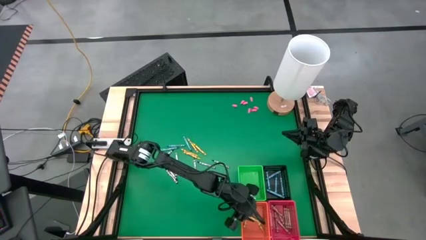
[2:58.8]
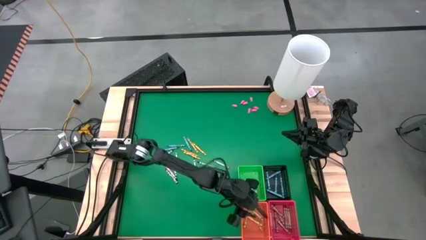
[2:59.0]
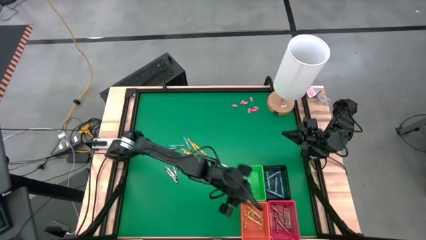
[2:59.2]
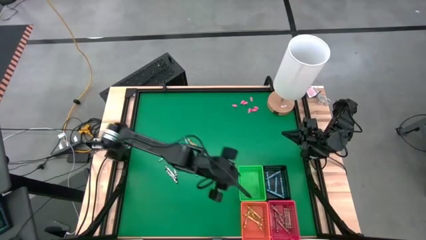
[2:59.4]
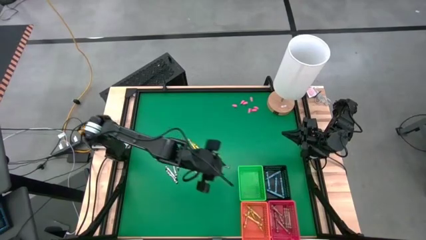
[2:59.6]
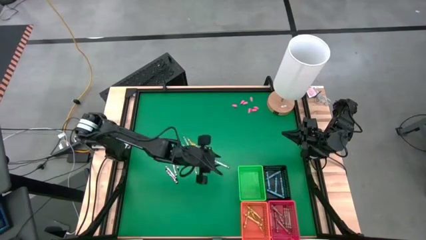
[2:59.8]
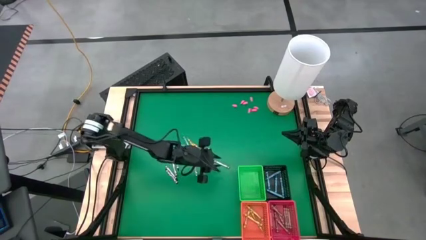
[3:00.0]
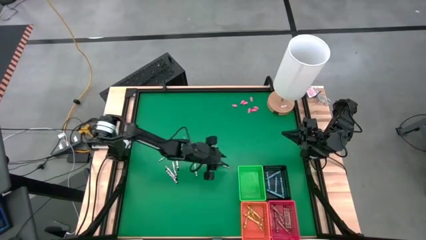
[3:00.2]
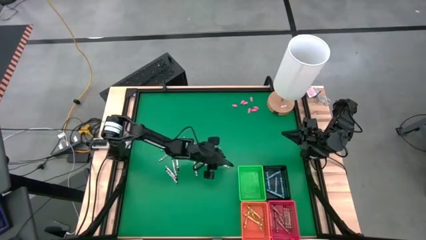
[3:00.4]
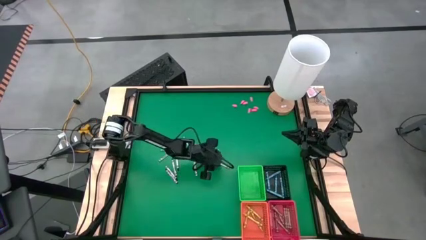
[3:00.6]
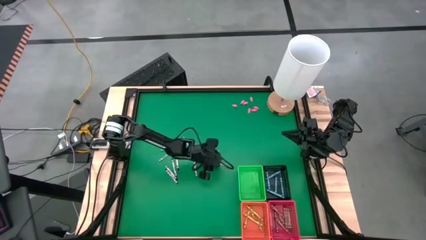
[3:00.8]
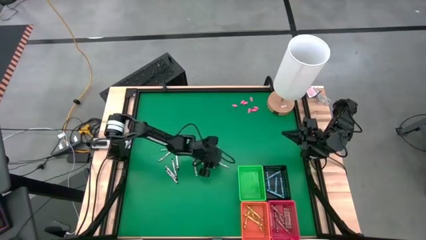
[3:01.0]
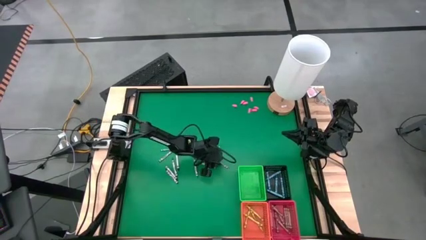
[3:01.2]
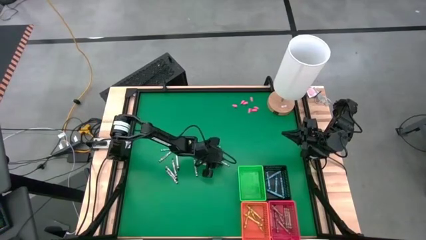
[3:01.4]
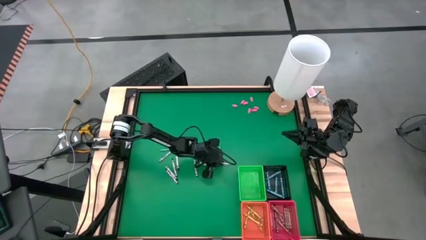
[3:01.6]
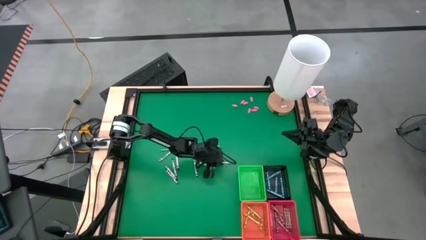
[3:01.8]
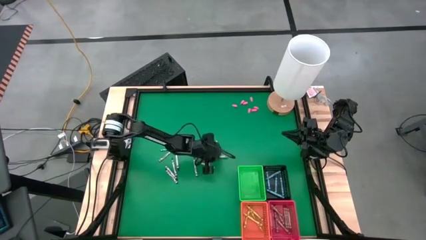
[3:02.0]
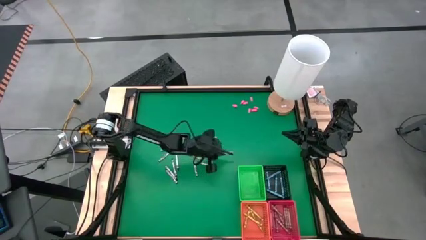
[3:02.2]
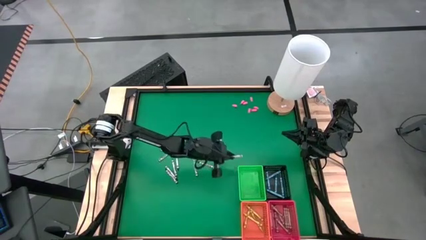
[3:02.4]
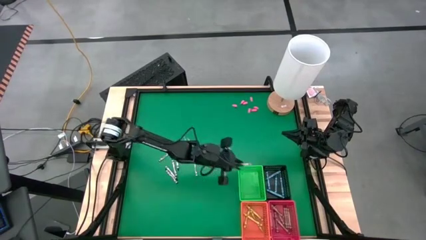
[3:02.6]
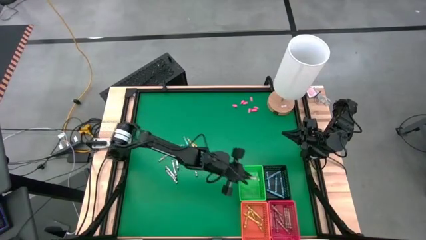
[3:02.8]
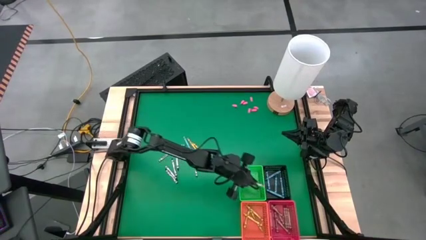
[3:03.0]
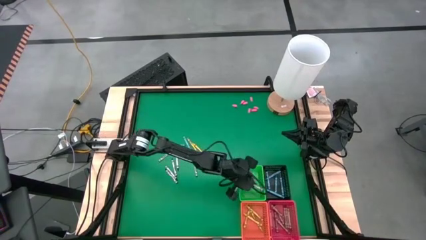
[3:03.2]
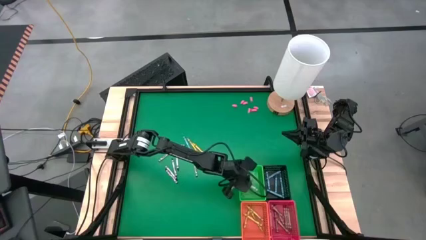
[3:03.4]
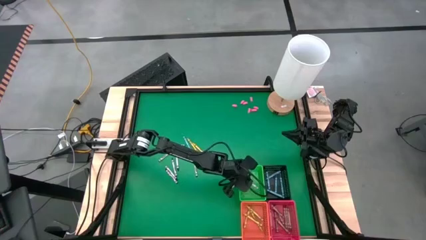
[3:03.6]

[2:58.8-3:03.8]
Task: Sort crayons
Put the black crayon into the green bin

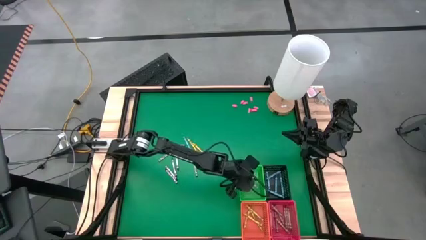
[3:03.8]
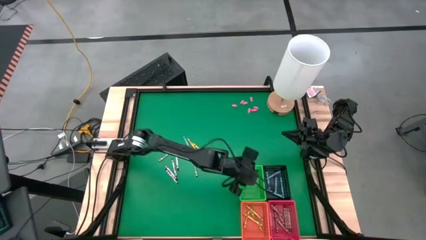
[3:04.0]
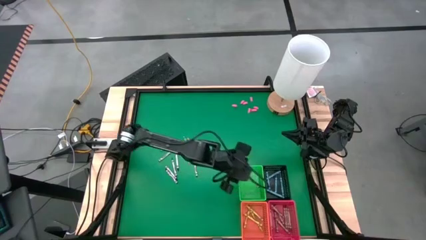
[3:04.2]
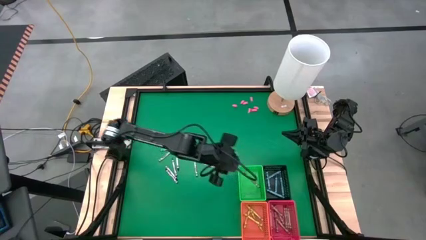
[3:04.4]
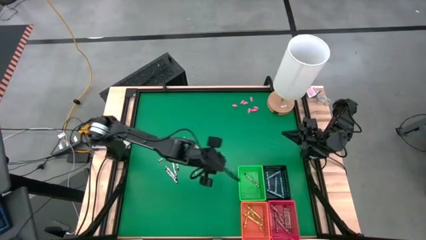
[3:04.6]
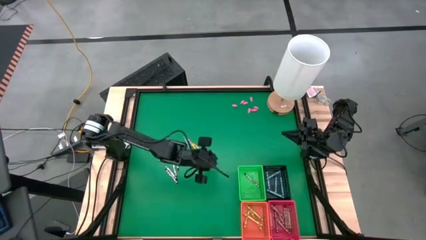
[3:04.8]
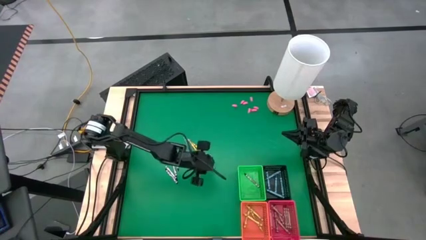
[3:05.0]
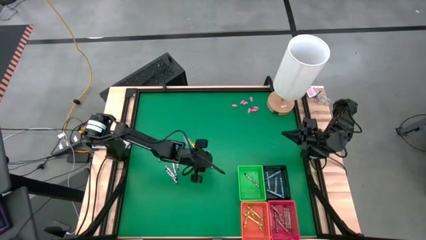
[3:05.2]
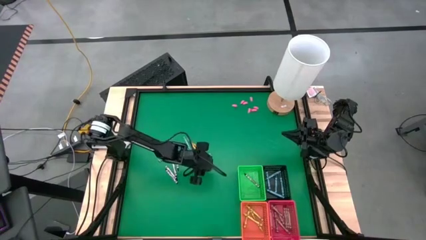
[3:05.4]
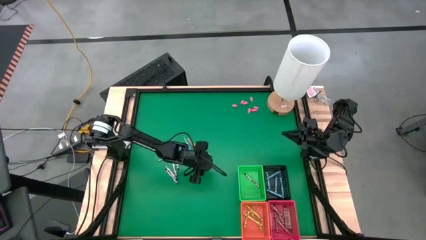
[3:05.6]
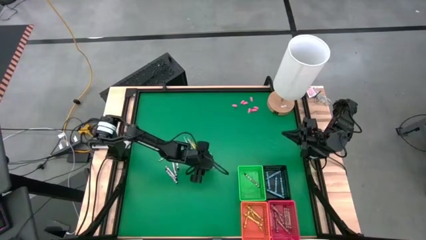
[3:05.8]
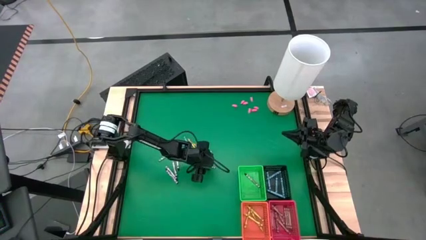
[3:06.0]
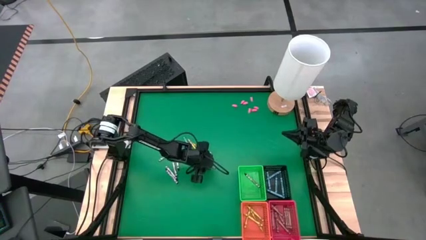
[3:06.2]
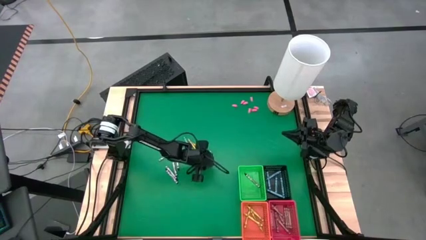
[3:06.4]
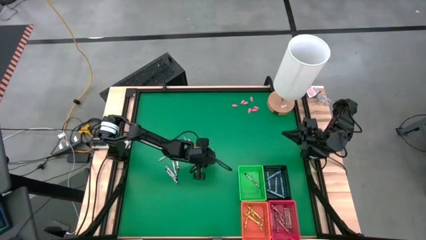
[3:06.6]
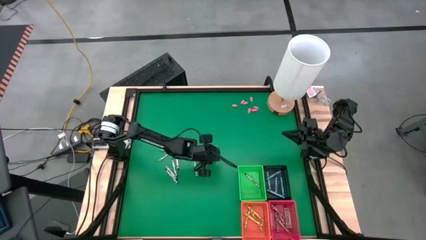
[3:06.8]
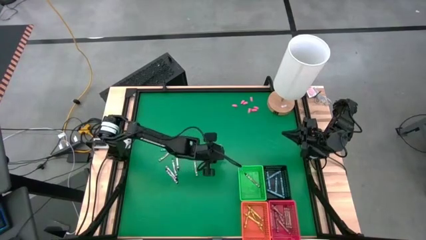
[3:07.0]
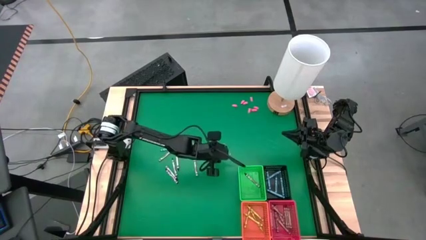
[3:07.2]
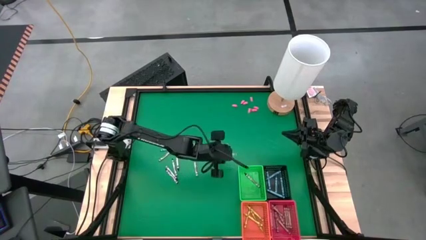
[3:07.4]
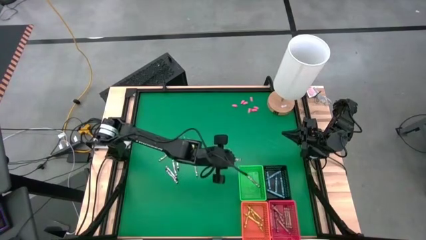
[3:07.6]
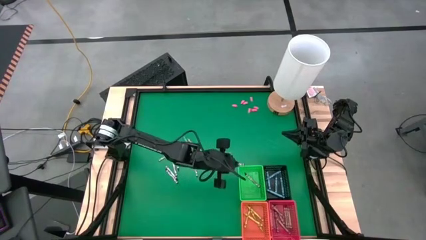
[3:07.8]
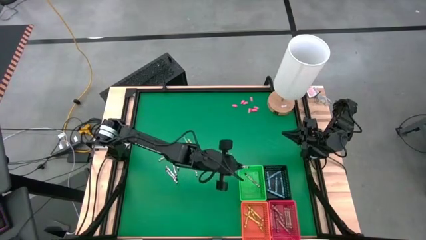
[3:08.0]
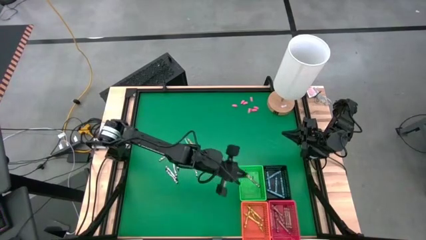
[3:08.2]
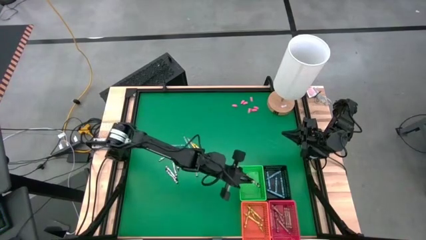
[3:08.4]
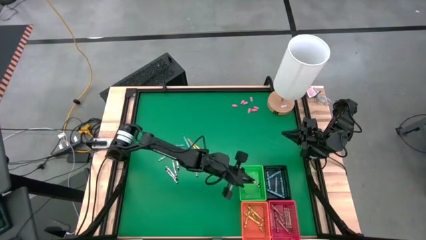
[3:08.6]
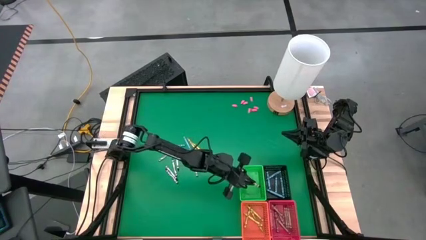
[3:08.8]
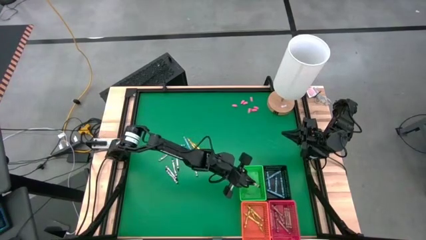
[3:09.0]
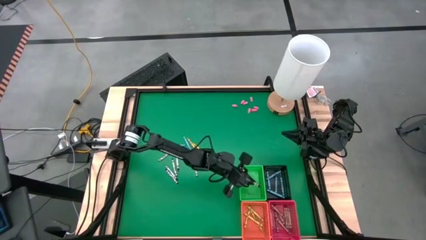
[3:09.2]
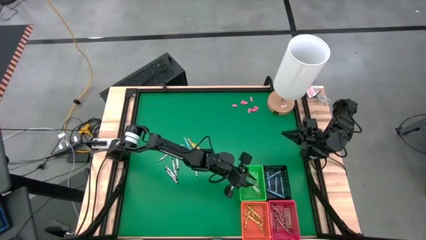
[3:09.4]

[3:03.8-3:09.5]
Put the black crayon into the green bin

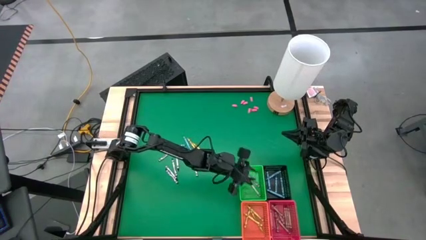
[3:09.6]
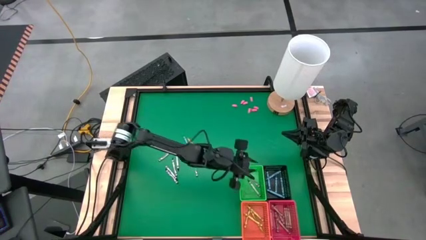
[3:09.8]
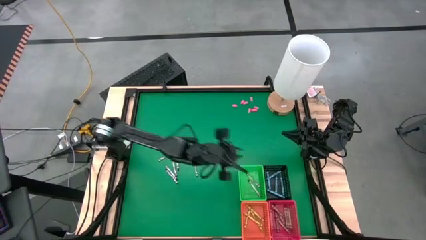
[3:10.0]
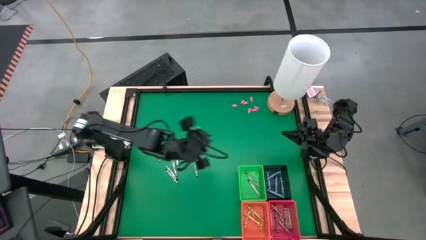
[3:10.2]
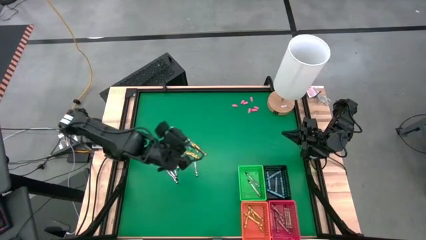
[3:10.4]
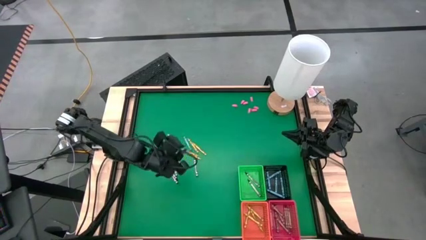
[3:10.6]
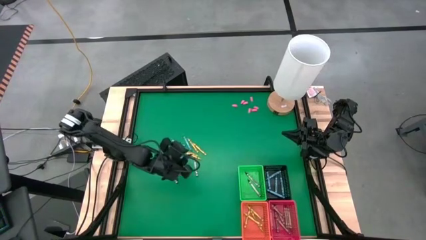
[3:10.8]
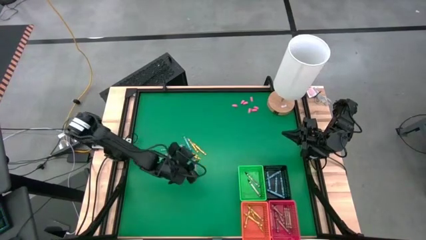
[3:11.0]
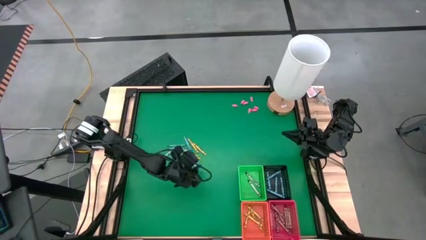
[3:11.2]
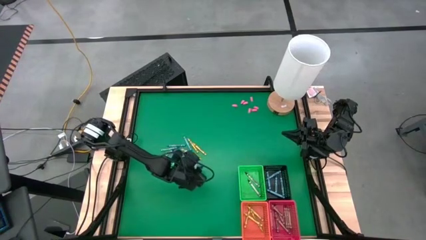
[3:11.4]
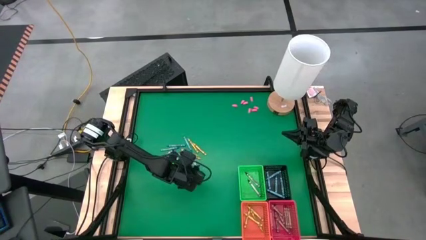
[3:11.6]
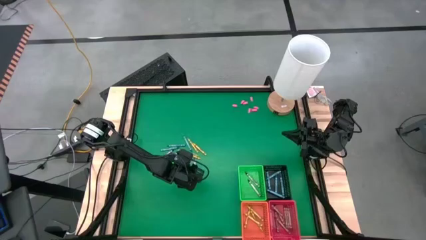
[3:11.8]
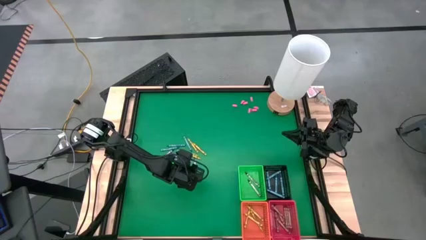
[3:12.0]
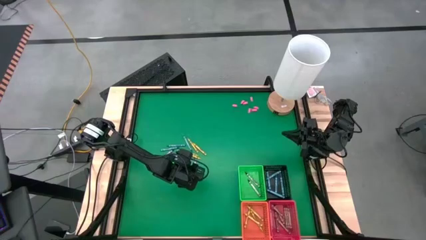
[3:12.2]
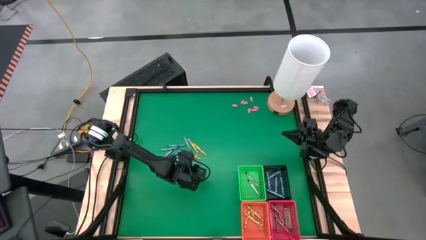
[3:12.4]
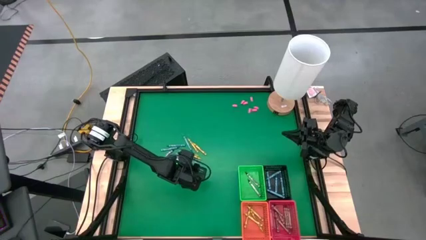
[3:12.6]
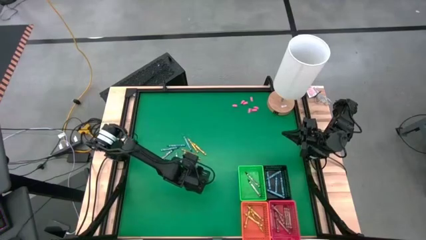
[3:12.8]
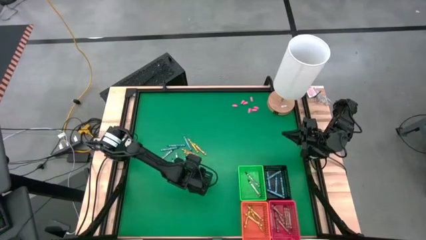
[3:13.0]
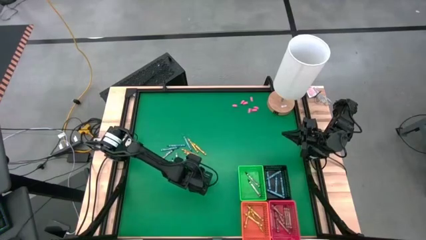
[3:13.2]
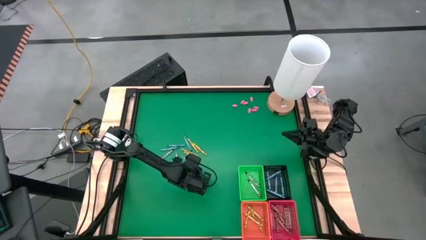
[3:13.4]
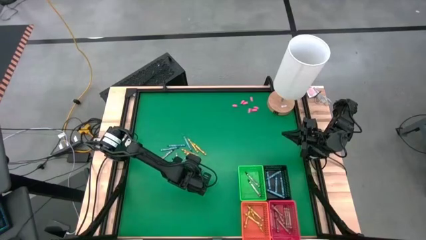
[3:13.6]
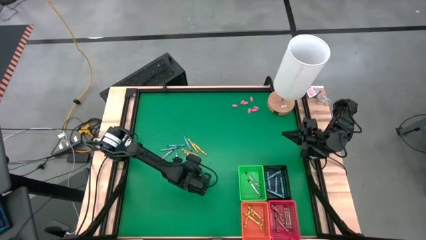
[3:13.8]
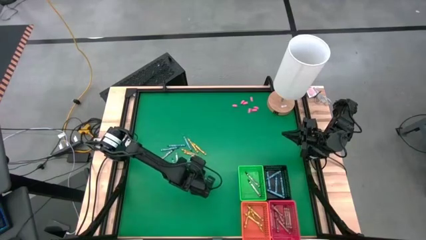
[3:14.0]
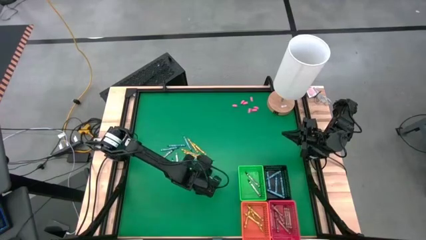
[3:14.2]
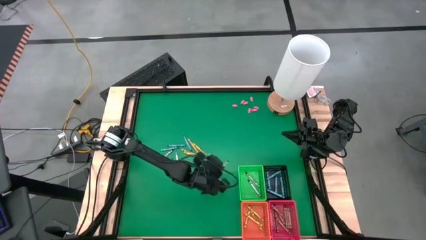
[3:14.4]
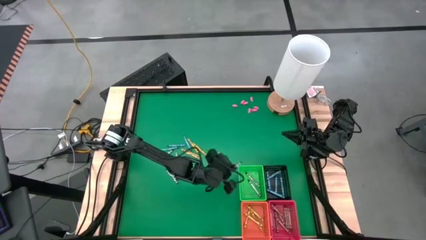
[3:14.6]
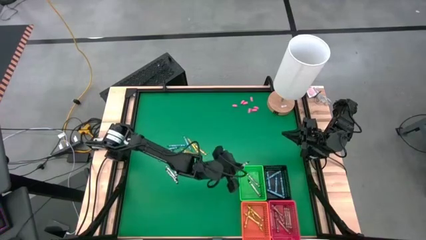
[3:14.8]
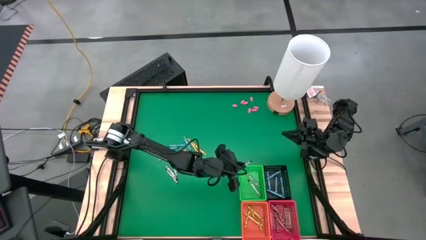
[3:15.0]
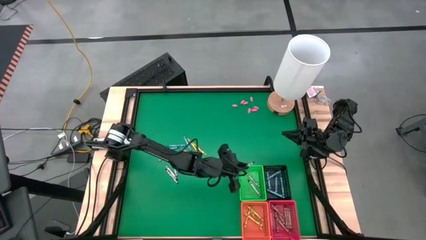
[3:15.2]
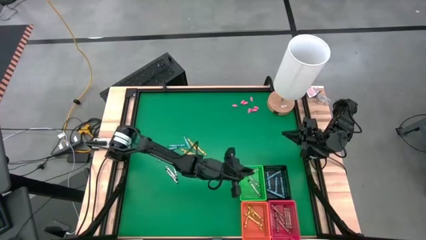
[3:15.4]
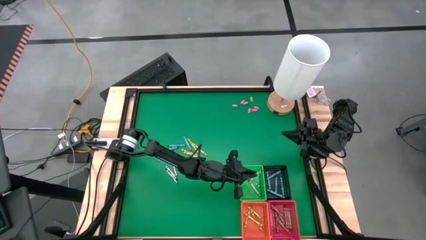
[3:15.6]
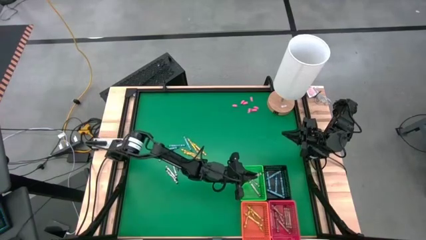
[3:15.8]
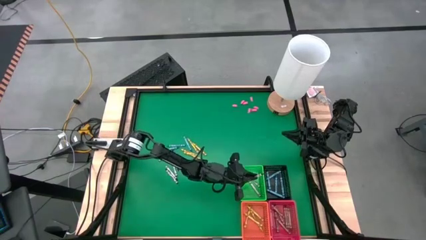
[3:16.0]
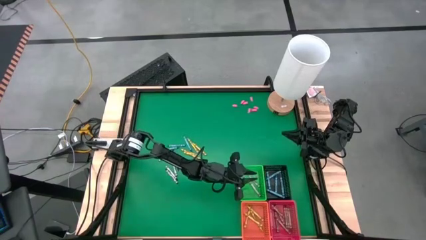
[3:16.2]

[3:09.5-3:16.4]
Put the black crayon into the green bin

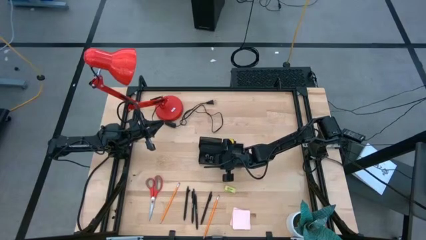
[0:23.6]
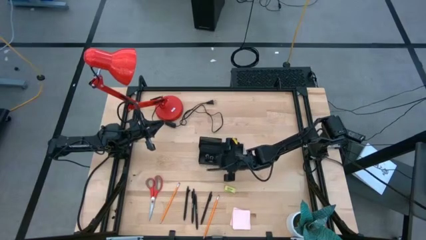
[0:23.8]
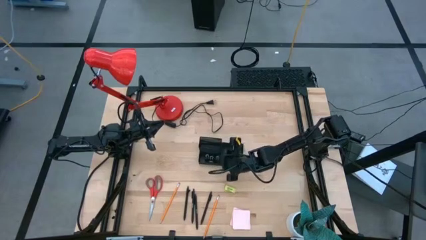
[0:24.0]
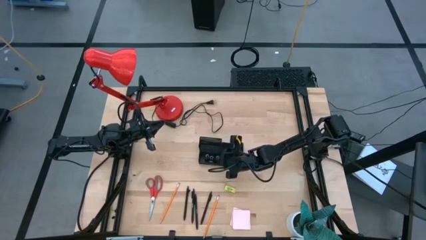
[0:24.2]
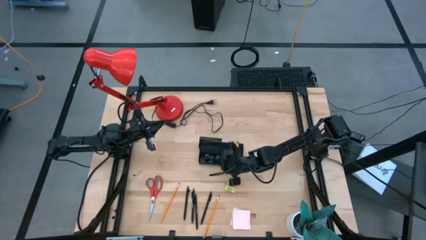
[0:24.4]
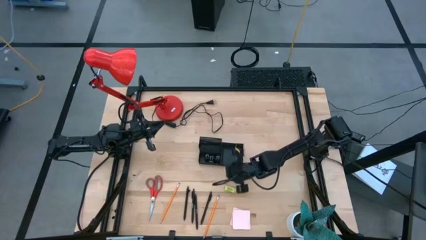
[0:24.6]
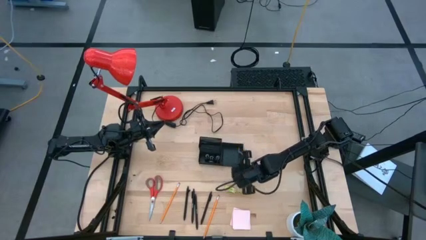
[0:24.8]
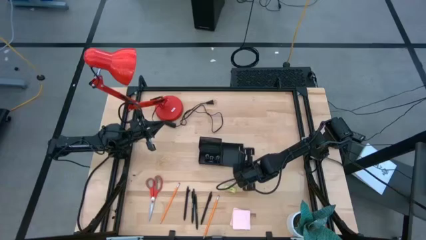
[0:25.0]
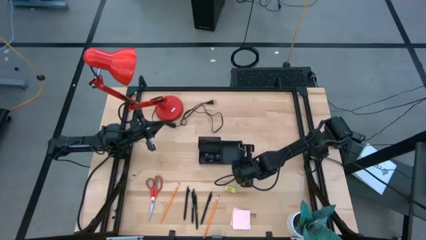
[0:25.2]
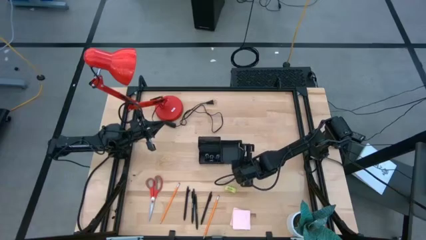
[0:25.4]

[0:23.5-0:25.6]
Task: Pick and place office supplies into organizer
Adjust the desk organizer
